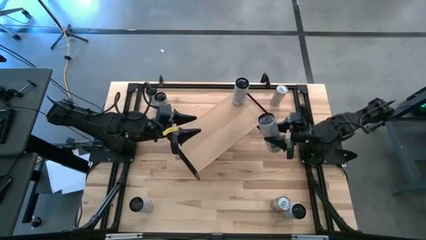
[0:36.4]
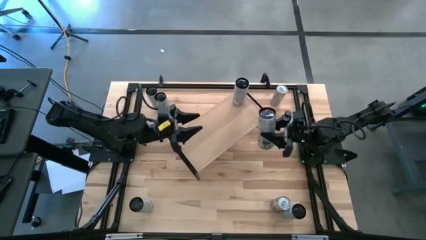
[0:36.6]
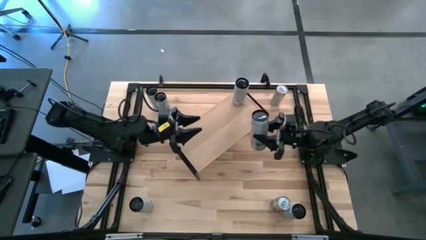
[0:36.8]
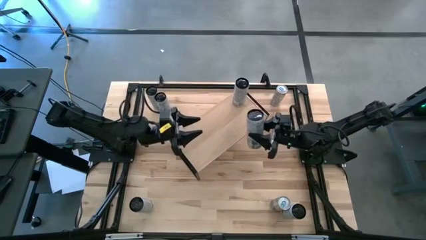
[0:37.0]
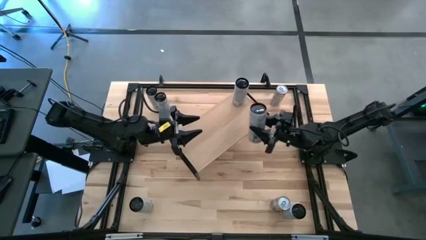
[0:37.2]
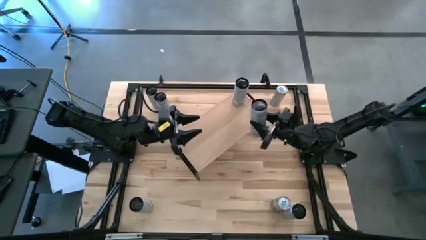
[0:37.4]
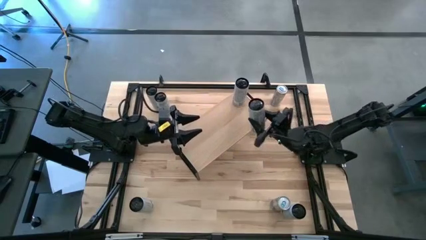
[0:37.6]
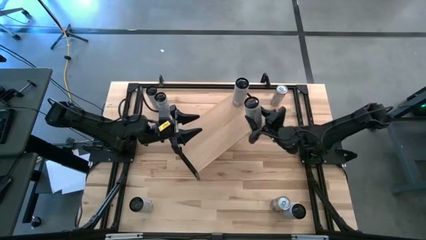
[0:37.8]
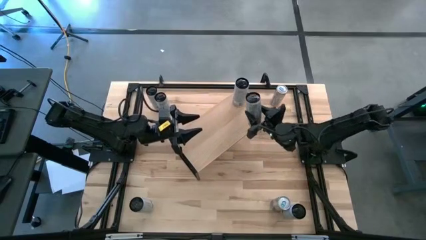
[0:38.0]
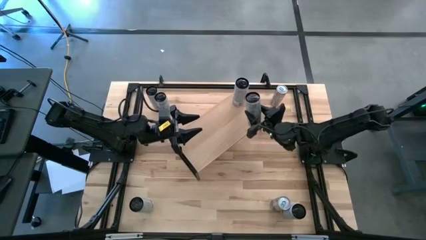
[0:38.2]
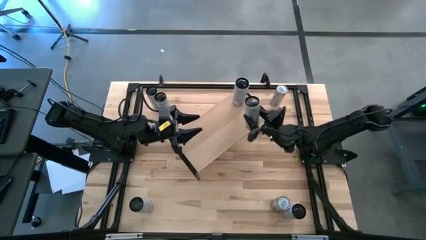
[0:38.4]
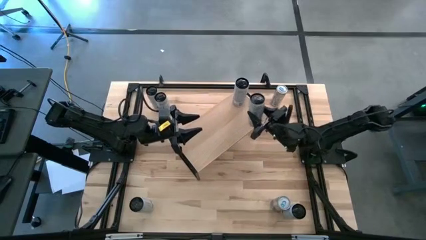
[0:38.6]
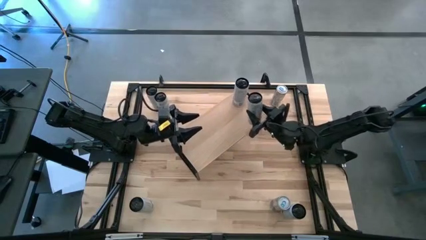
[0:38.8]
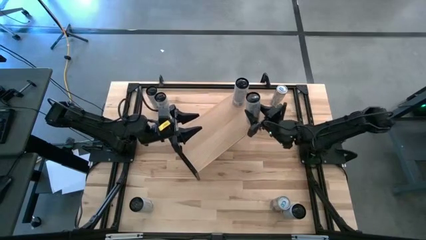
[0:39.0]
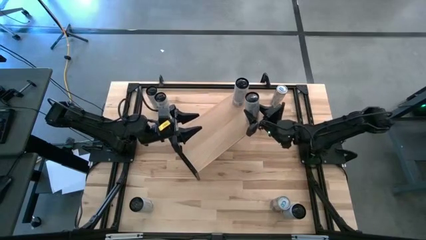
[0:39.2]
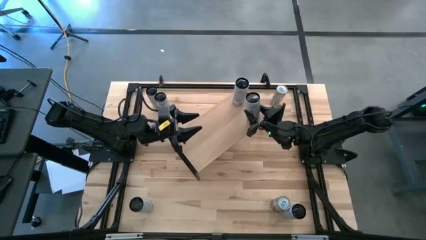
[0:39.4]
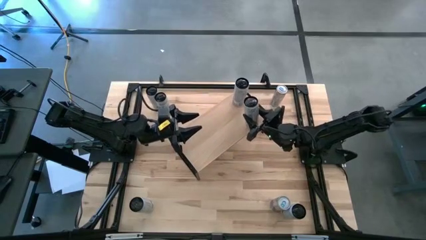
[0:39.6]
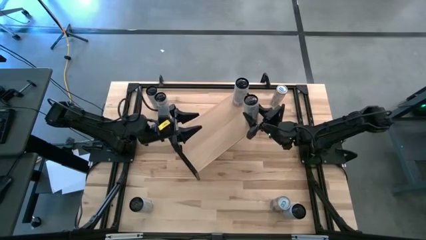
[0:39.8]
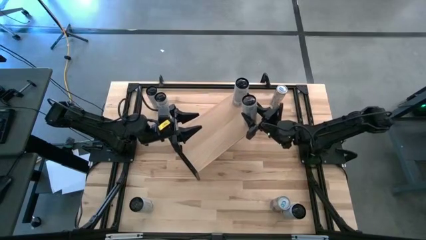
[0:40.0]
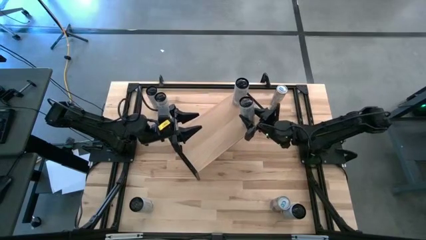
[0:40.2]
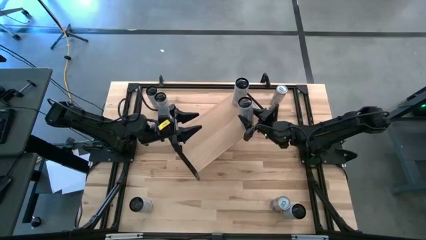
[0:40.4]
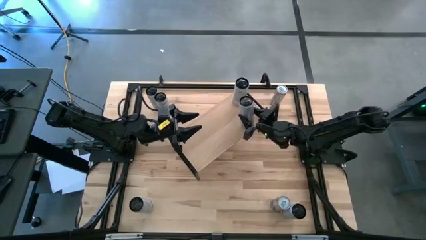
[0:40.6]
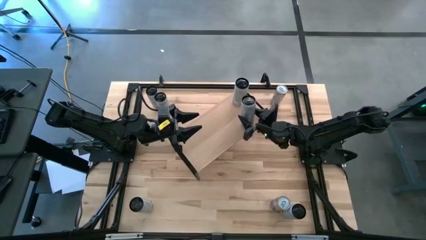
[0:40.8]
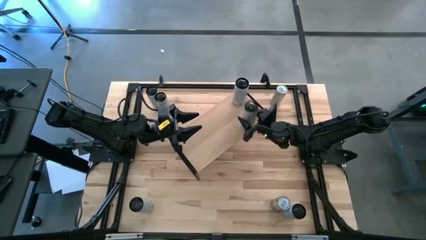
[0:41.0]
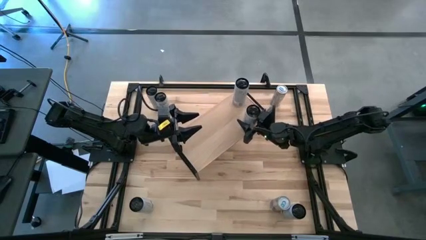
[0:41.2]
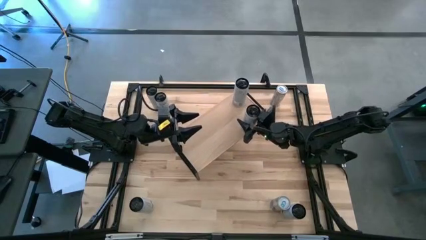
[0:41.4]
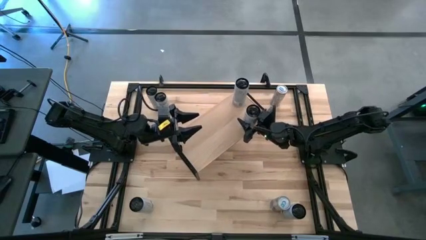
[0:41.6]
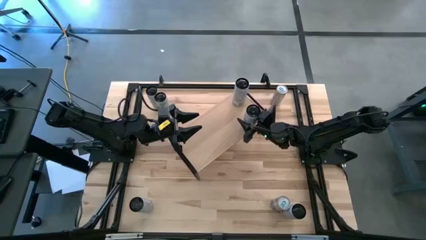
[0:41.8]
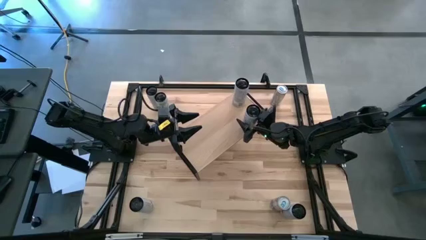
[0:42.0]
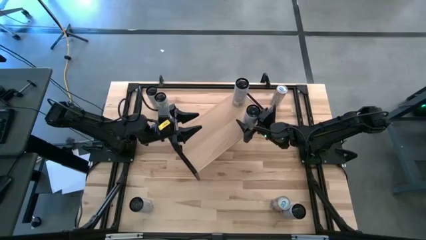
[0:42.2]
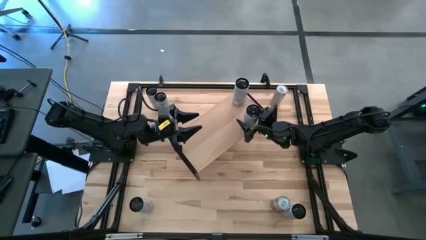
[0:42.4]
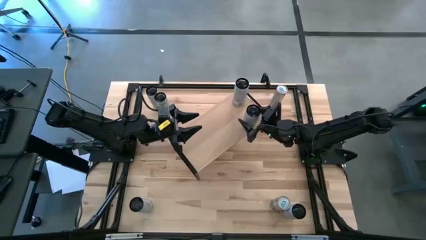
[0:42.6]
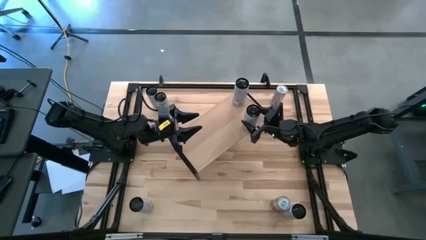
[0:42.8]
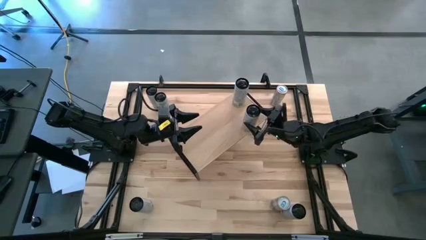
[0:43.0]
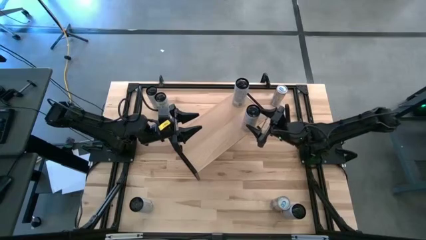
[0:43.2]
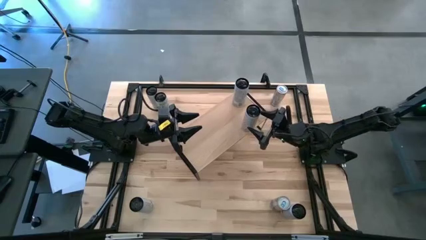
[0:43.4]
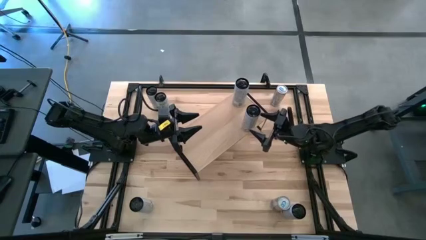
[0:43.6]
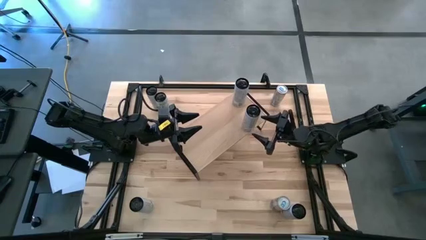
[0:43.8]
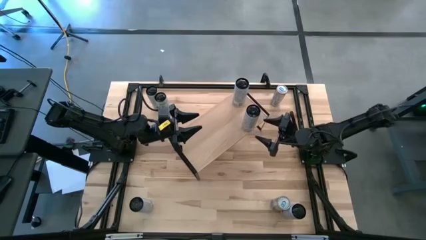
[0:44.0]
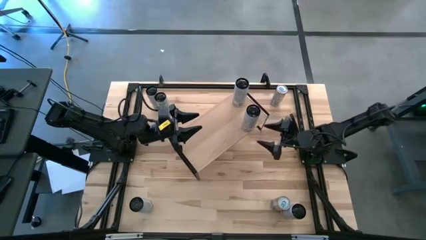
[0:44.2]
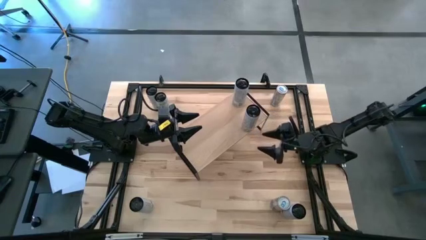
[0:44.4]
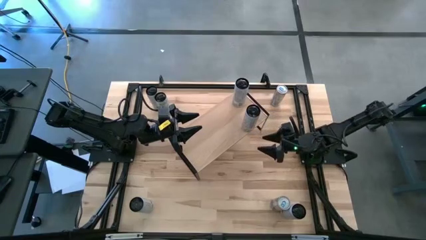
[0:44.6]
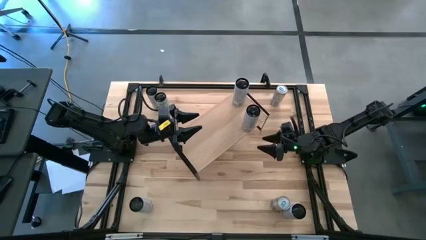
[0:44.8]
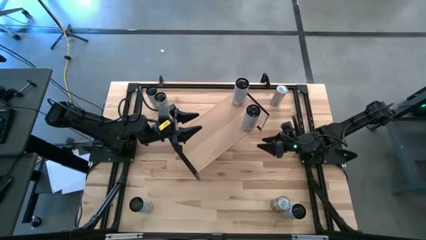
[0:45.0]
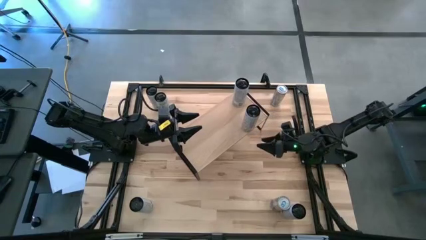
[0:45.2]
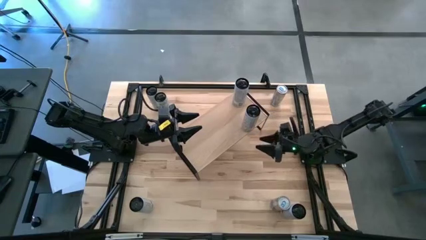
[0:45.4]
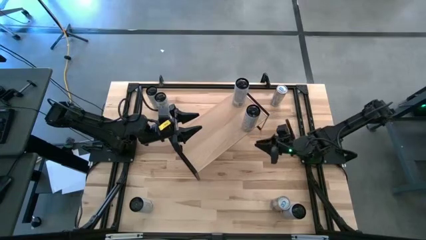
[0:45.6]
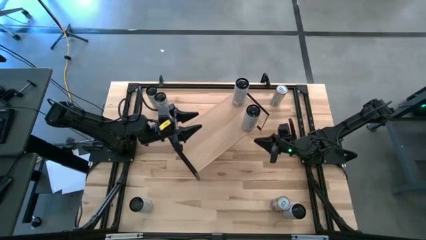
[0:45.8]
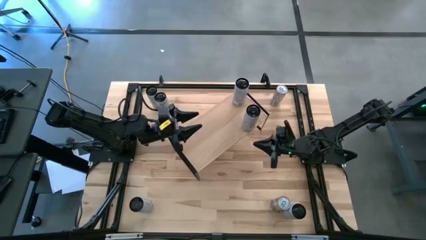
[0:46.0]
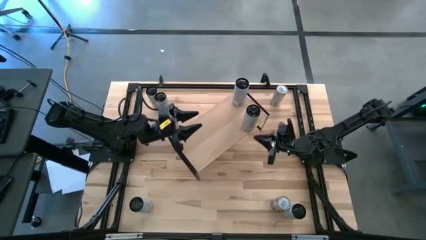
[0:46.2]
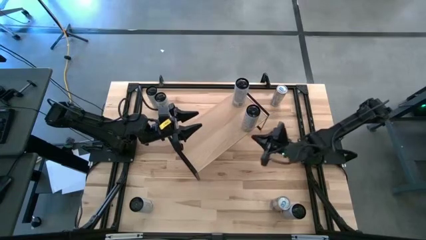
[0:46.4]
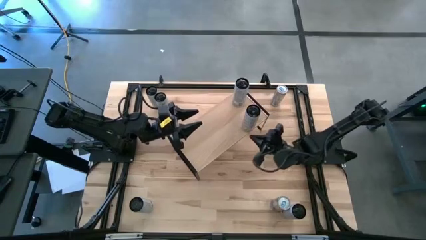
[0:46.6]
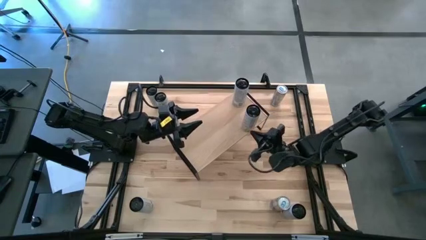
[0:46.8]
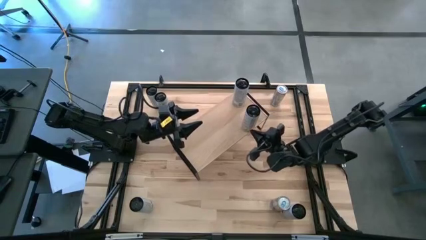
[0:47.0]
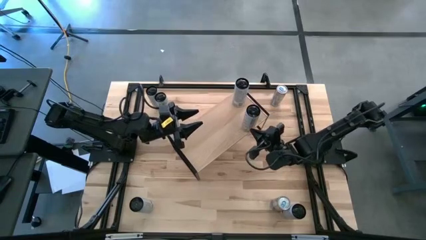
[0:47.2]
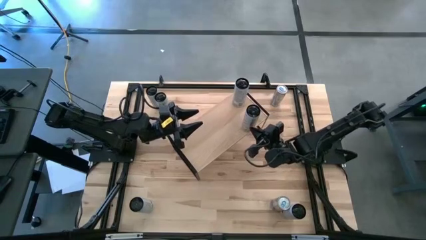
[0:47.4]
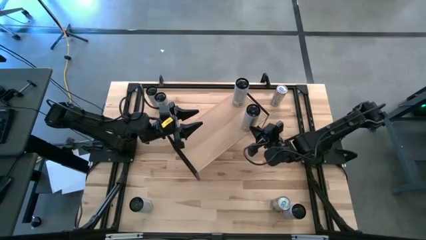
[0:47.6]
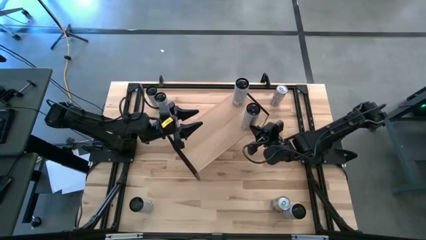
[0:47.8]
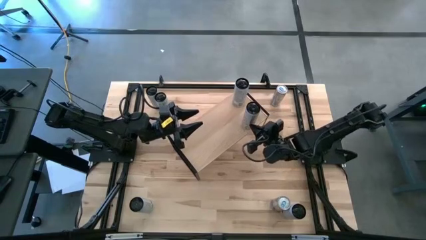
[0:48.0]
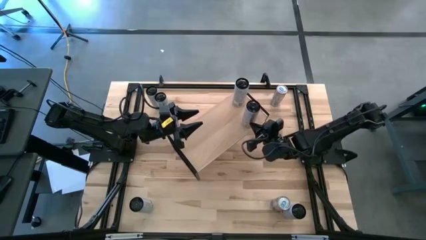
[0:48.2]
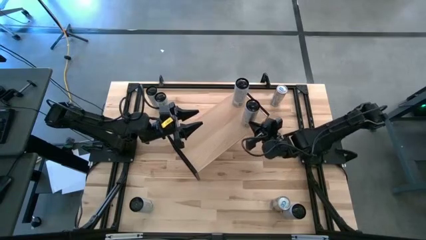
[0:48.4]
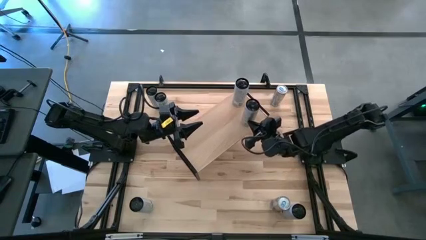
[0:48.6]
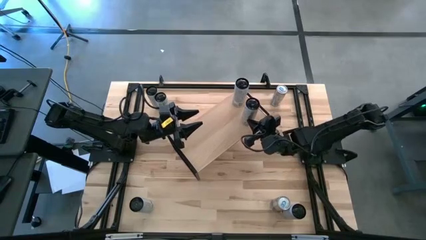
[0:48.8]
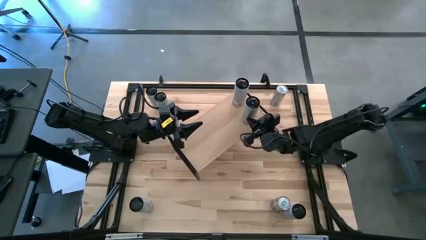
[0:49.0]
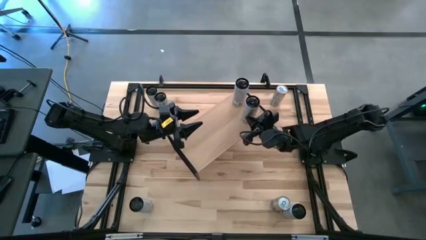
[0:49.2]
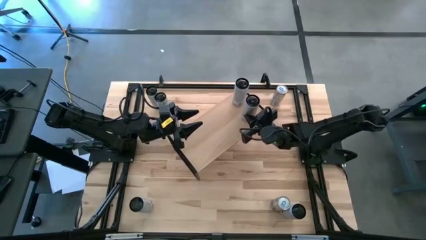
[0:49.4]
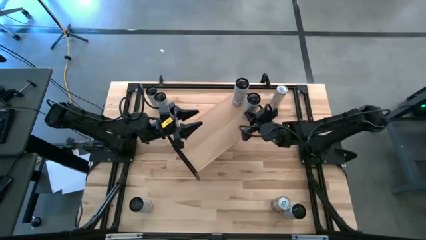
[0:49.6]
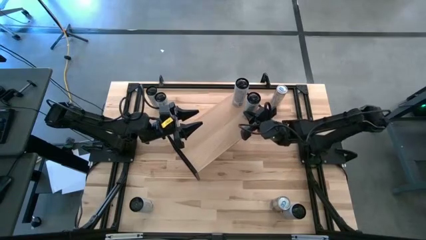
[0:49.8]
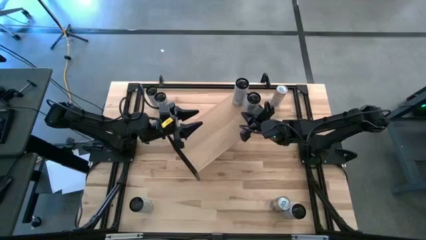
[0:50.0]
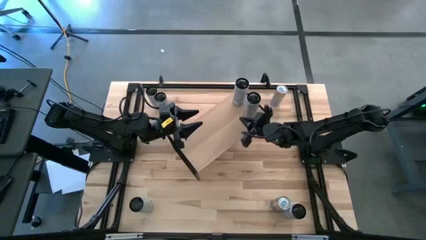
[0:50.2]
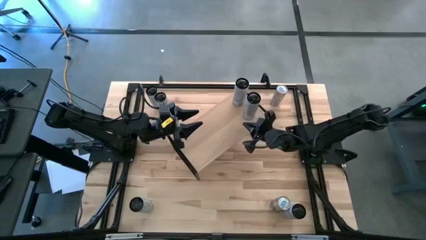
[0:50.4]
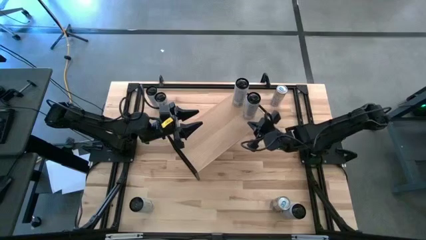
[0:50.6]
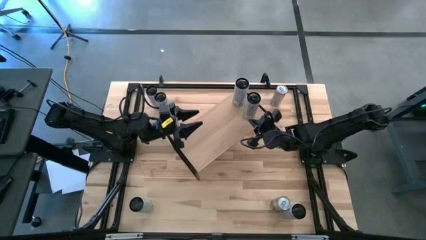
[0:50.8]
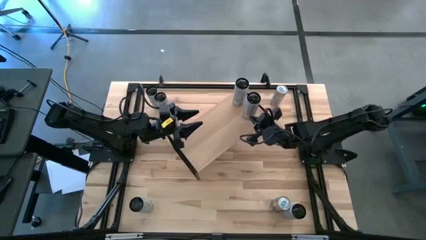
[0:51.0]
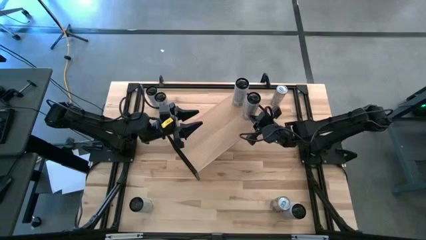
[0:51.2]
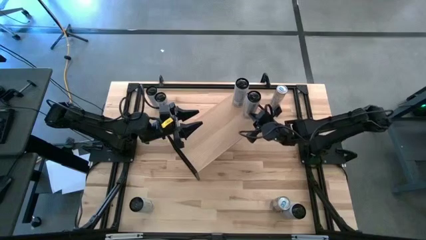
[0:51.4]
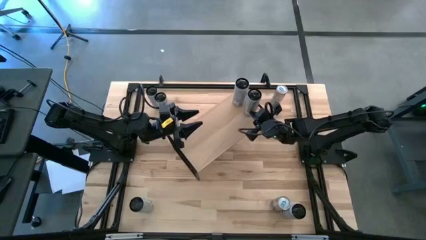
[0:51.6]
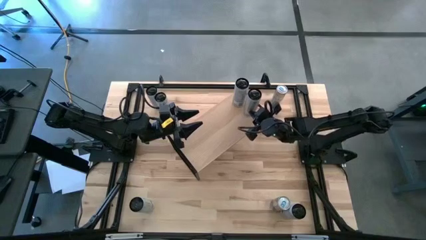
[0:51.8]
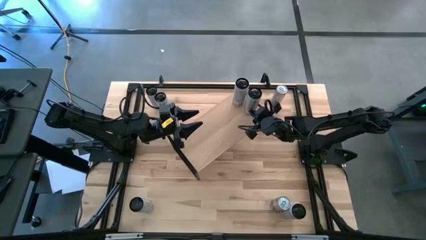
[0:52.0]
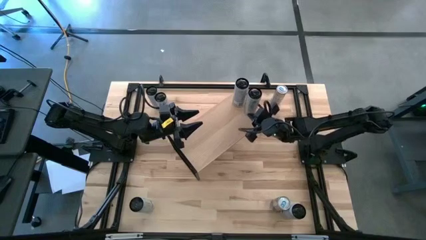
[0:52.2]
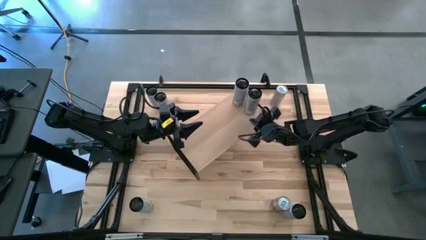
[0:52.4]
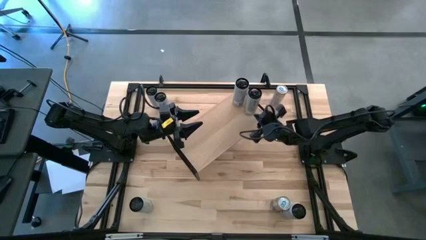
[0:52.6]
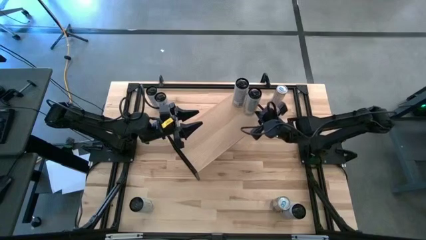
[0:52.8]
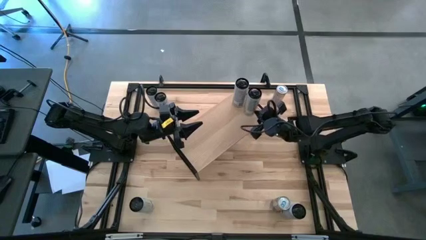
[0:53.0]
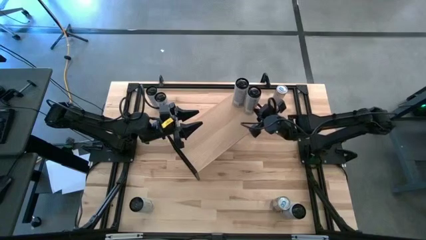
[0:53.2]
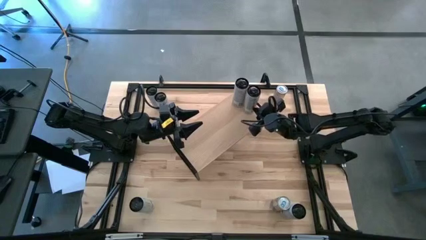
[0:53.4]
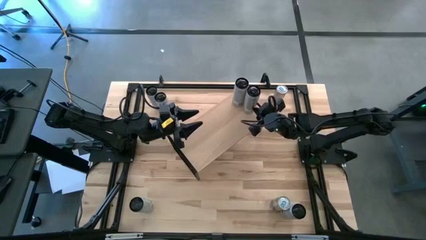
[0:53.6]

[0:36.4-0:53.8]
Task: Place canned beverage on shelf
Put the white-yellow soda can on the shelf and align it with the other white-yellow soda can
